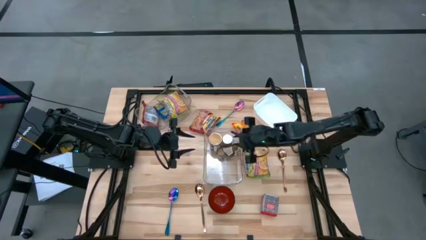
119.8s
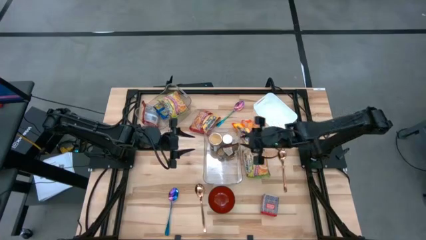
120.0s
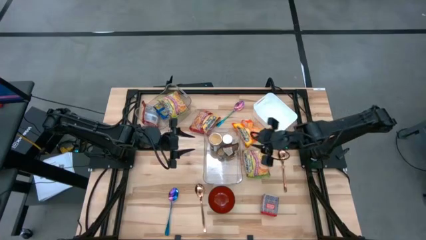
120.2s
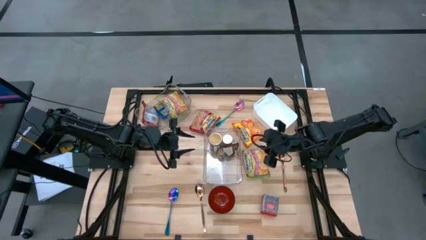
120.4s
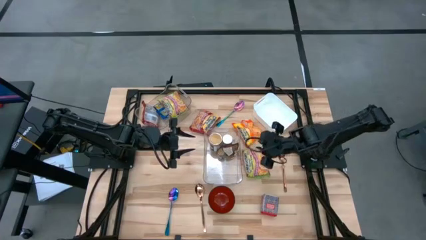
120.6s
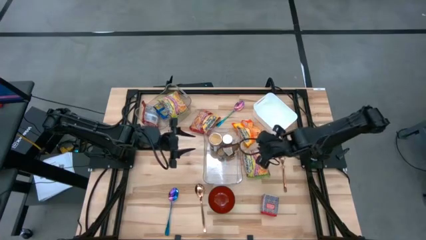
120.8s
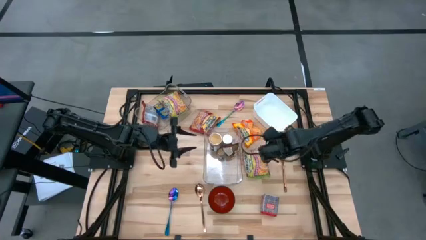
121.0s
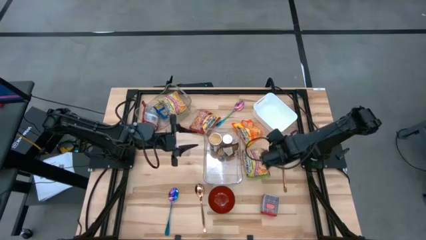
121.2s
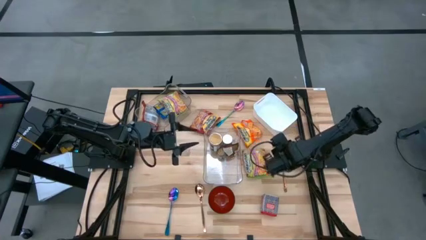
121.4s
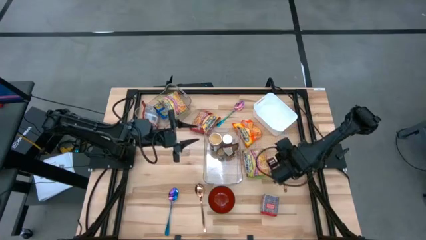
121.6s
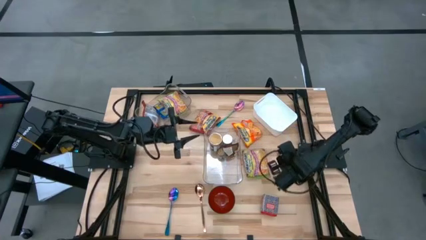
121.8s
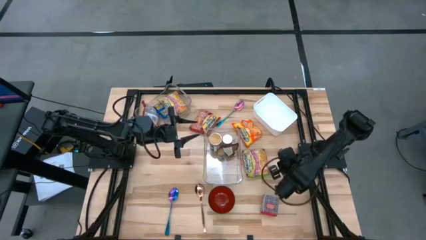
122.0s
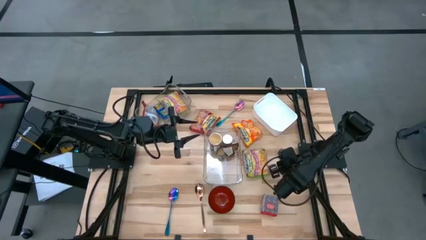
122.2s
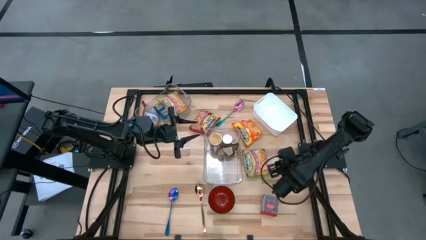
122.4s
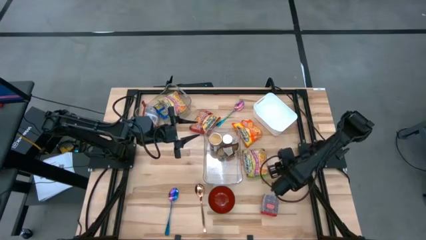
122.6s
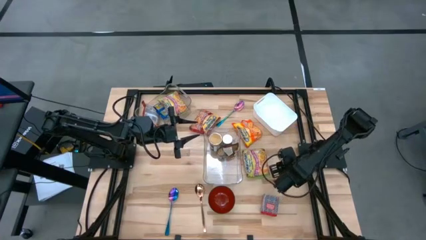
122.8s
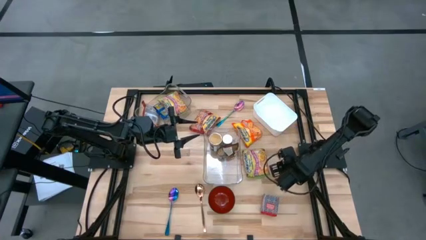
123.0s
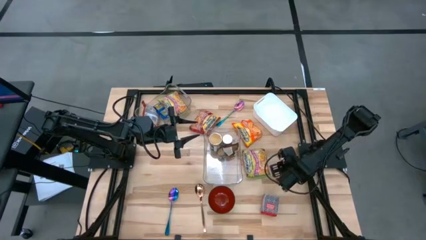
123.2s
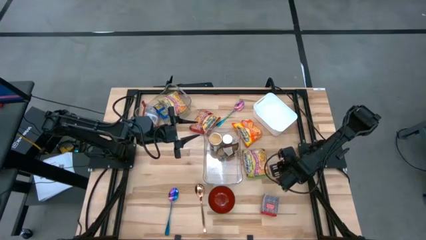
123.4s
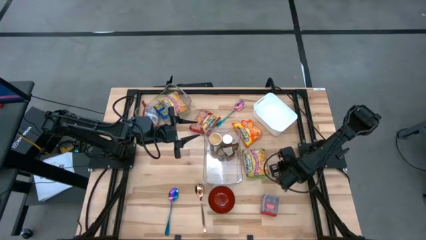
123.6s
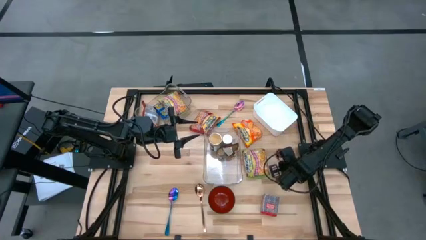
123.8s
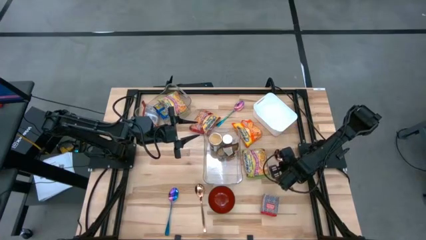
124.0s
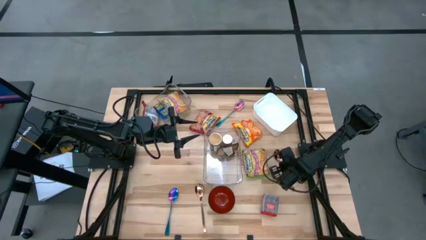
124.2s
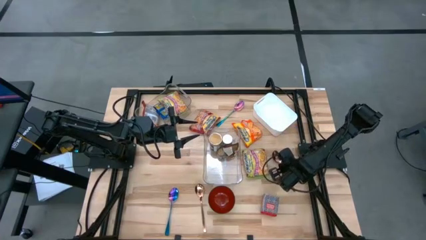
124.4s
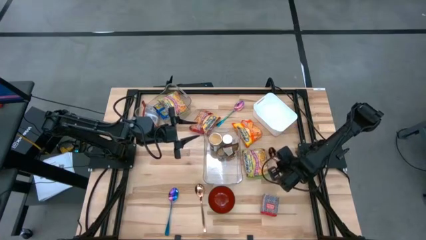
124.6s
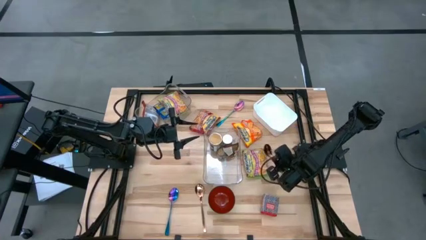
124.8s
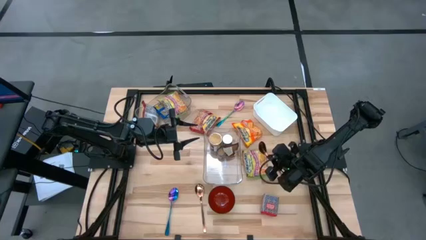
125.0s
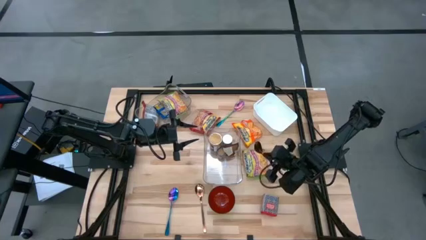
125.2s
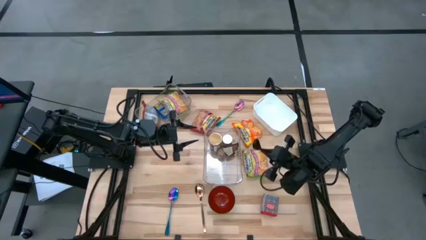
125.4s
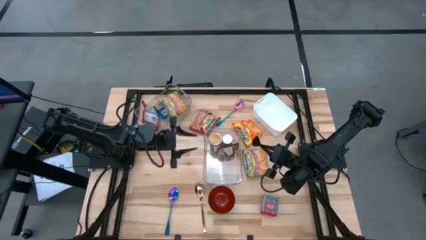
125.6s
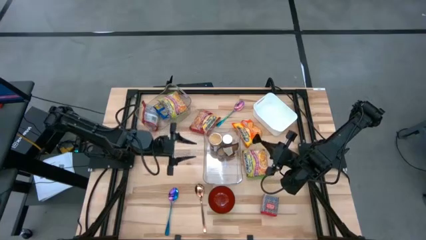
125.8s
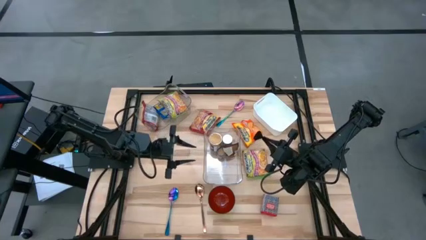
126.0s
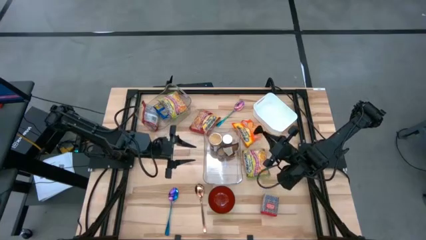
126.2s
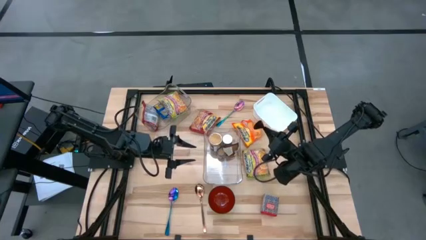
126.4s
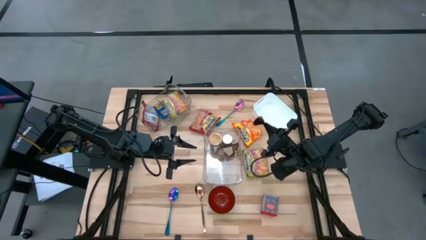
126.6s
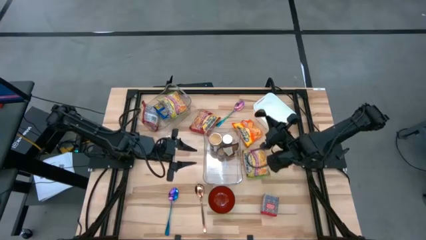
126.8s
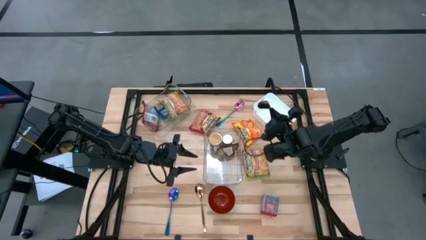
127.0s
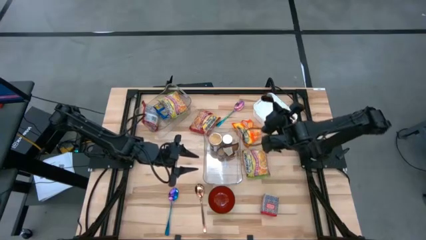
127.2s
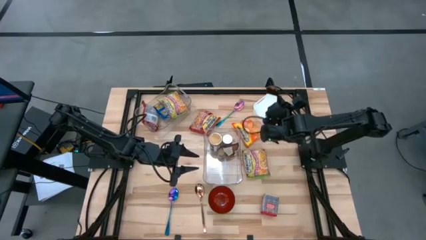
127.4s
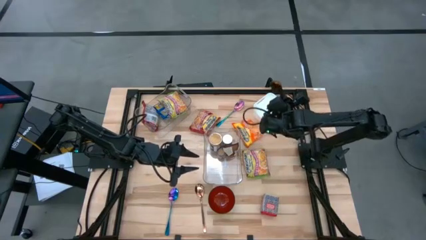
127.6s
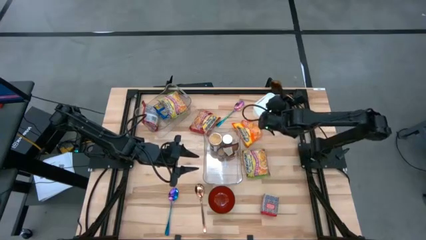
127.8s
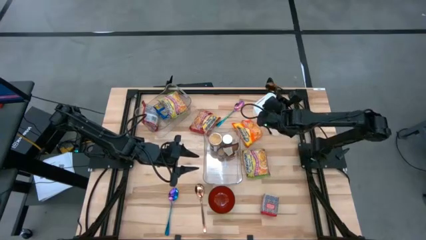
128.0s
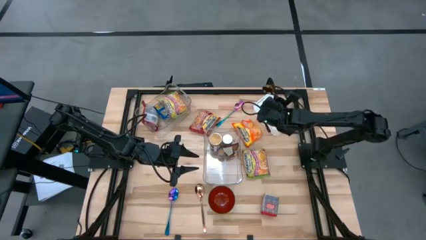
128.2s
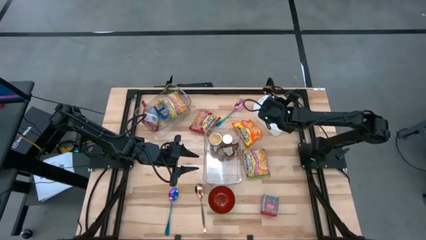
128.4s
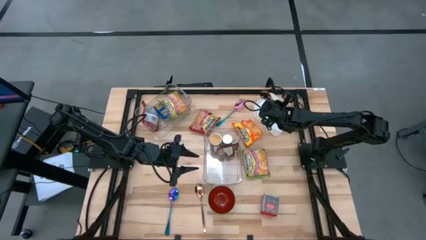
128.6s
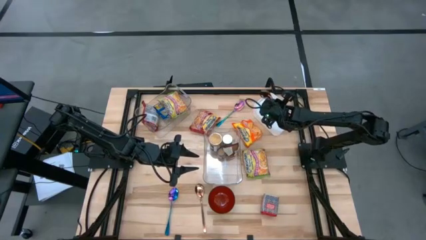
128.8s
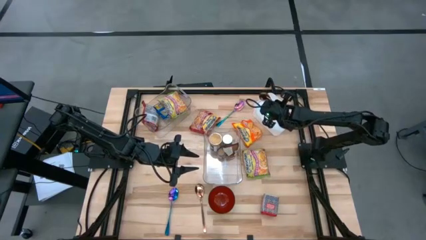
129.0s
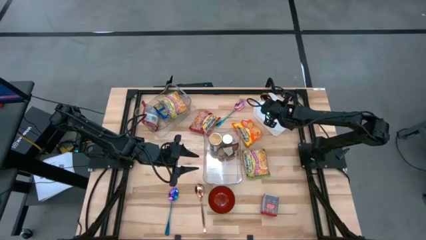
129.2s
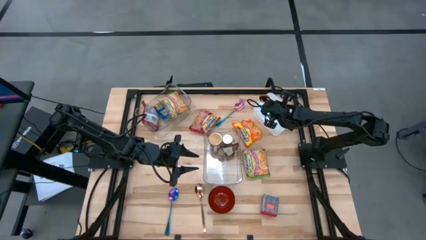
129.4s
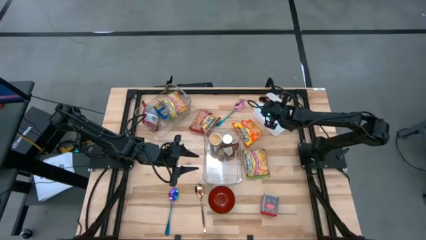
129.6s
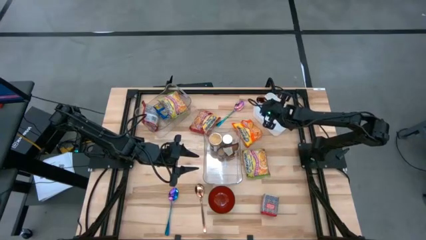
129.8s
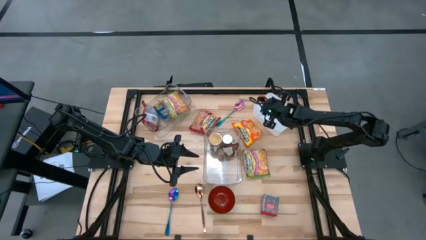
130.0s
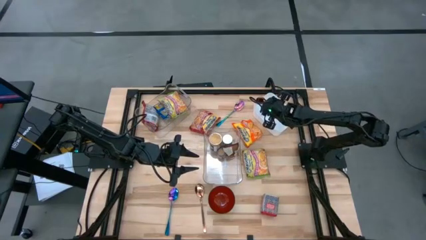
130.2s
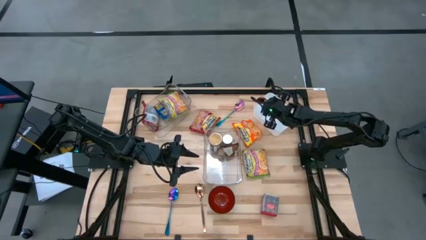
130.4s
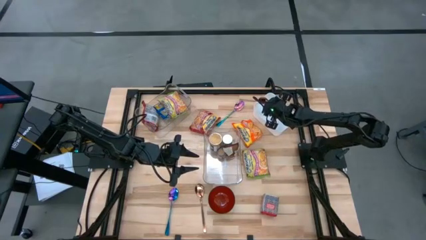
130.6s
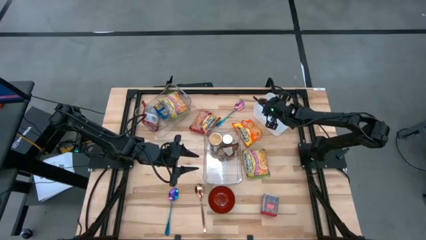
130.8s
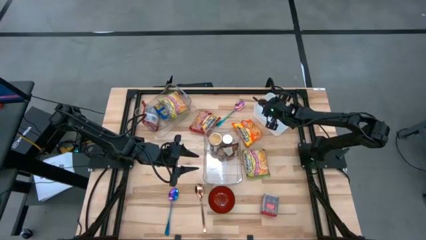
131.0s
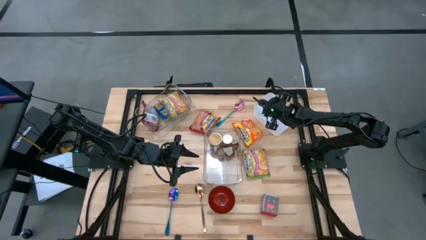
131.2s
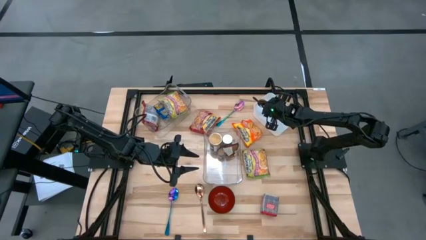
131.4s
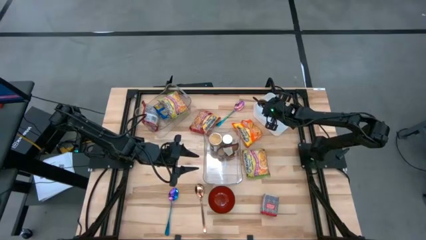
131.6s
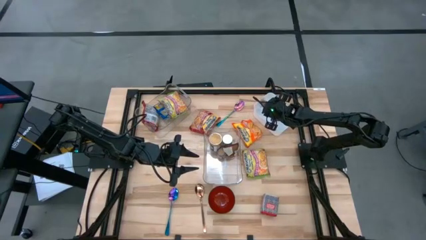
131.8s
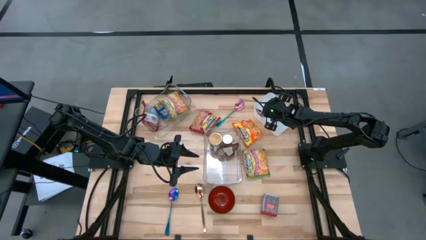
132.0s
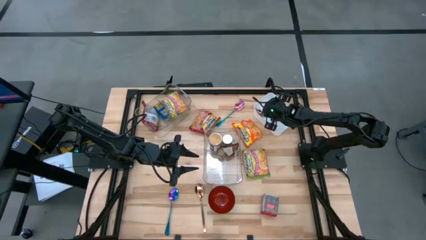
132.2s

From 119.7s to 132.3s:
Task: Pick & Place Food Item
Put the top gold spoon into the white bin
